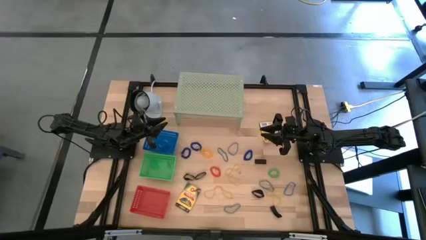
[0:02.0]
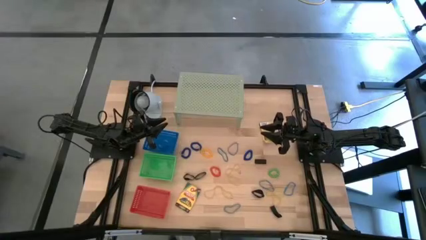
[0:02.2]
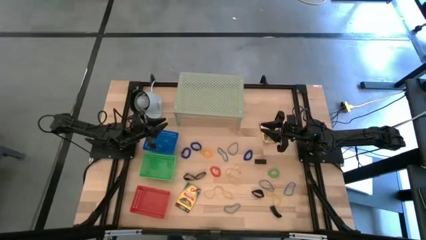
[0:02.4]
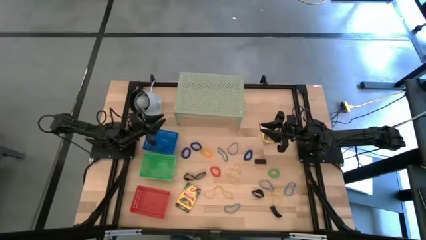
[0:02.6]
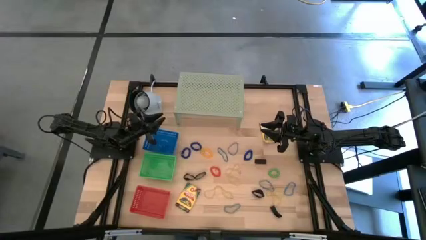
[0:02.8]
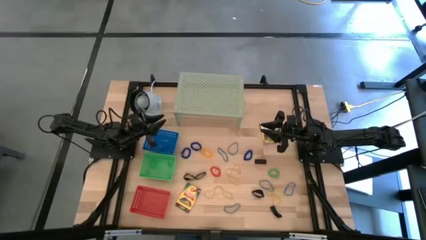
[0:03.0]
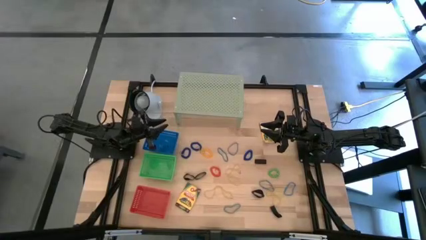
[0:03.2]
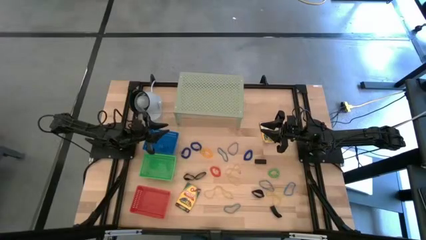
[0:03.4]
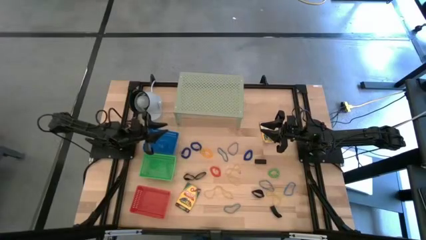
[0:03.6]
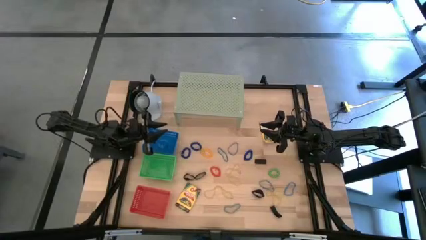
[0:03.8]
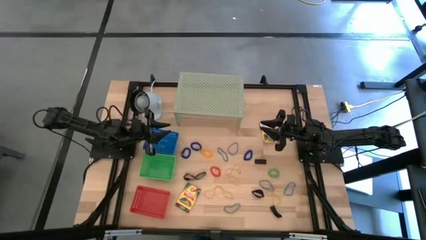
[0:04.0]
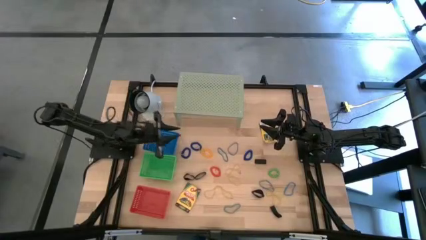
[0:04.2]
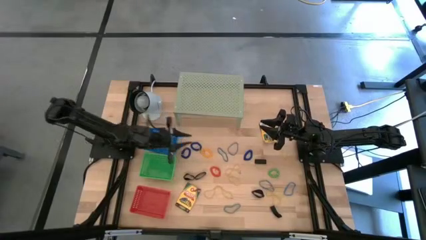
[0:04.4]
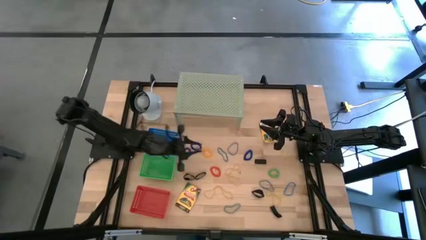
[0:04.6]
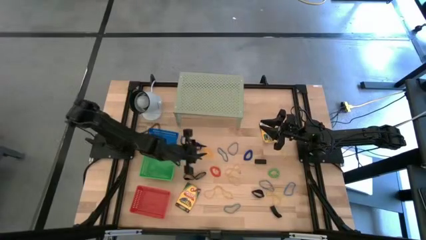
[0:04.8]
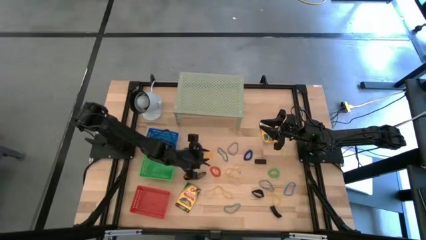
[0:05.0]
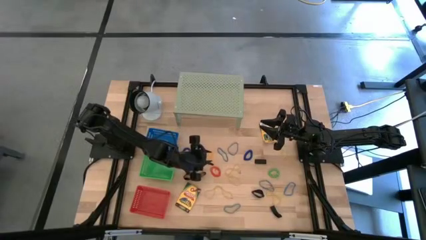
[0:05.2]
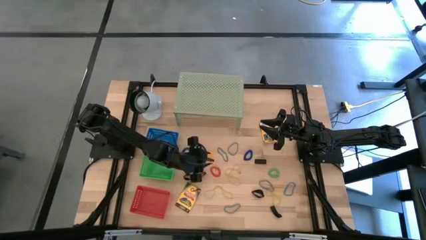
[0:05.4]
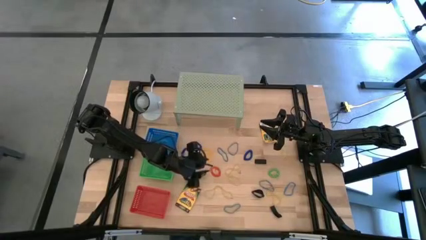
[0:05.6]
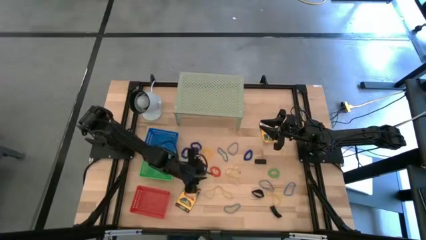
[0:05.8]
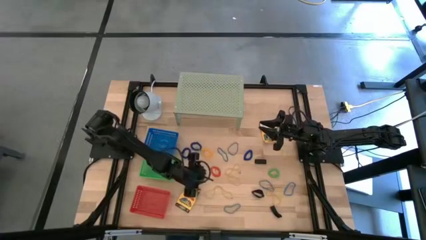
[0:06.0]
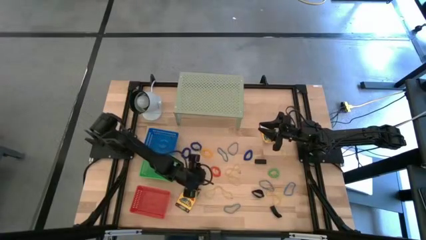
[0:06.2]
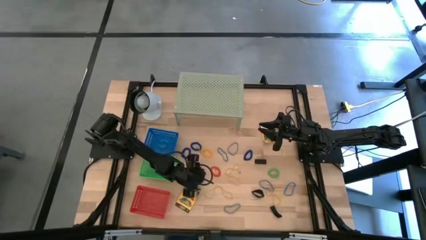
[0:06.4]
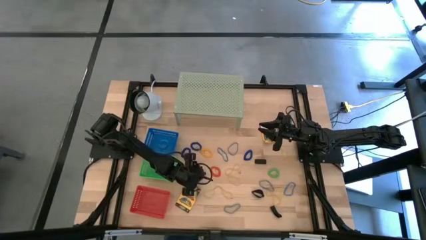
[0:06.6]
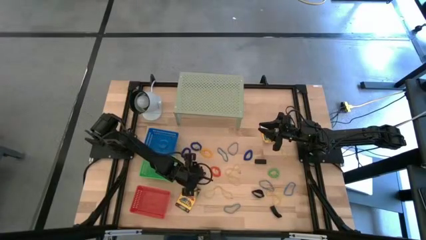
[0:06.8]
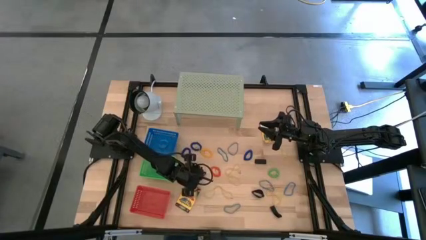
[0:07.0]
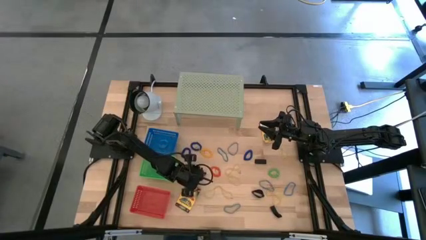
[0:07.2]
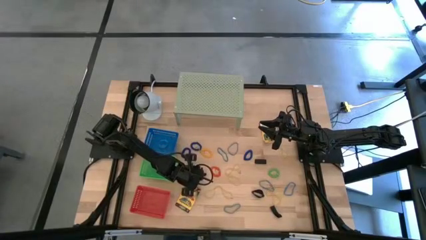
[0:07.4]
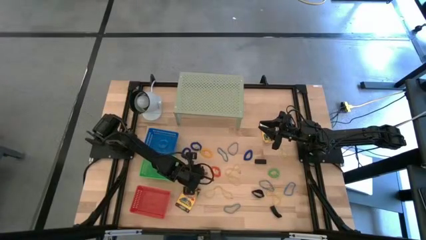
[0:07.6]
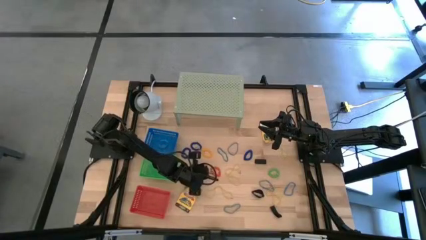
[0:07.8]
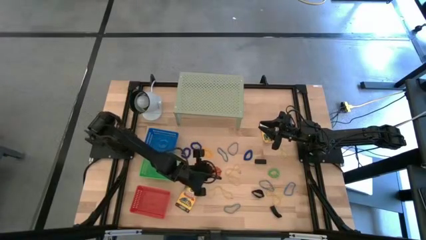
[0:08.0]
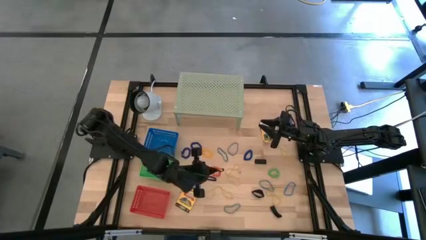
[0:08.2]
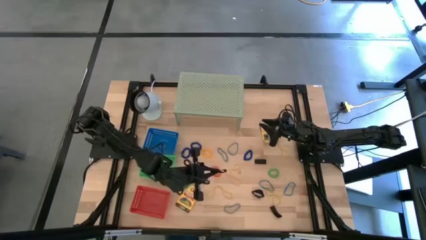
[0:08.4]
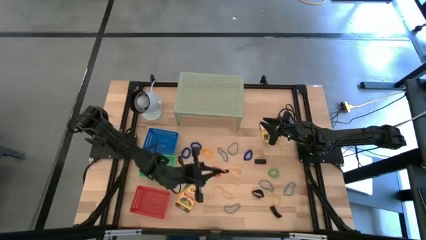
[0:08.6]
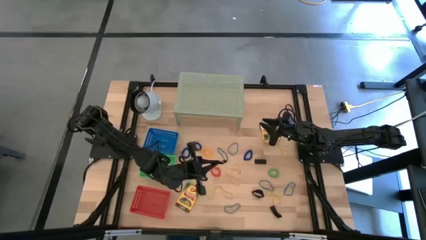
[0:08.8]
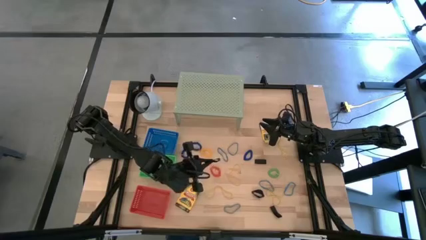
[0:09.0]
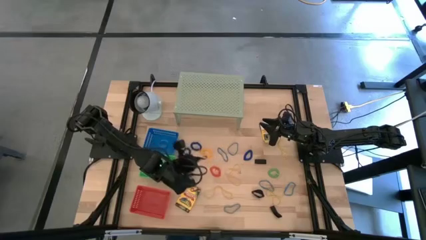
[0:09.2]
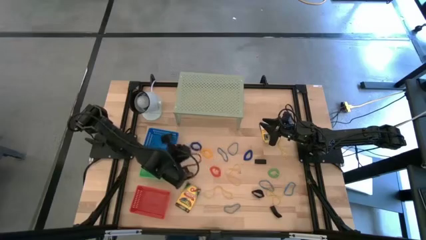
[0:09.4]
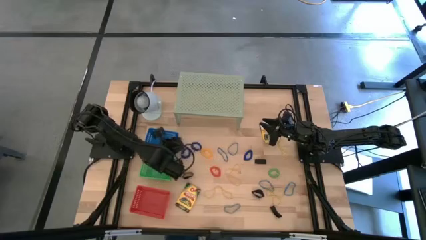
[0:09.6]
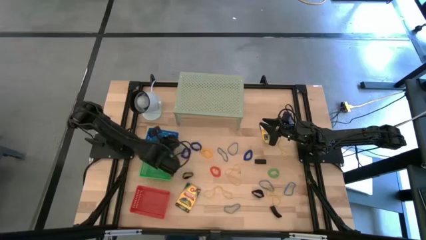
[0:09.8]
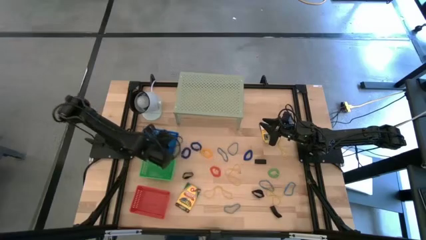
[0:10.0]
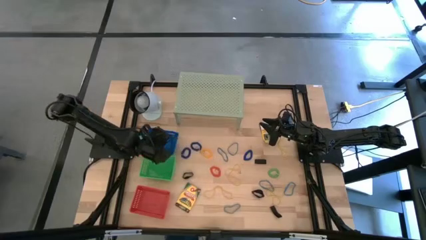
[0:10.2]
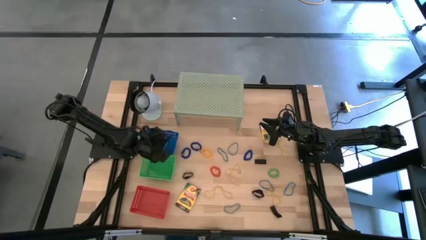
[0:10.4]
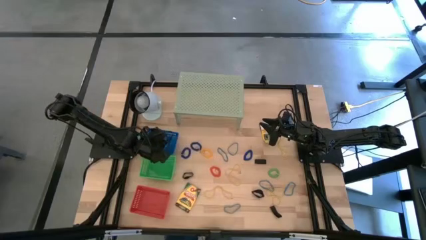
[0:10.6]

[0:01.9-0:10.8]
Task: Pick & Place Office Desk Supplies
Put the black rubber band into the blue bin

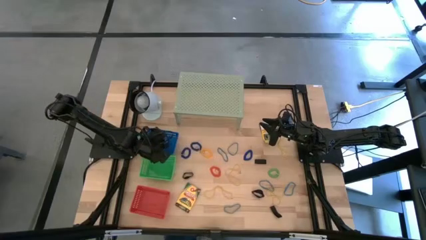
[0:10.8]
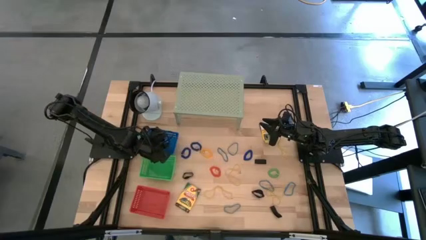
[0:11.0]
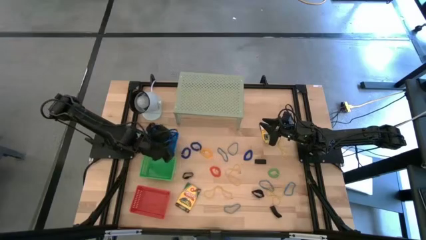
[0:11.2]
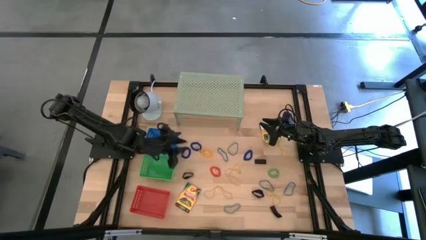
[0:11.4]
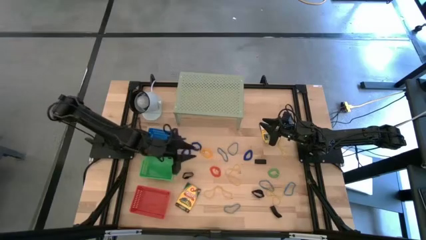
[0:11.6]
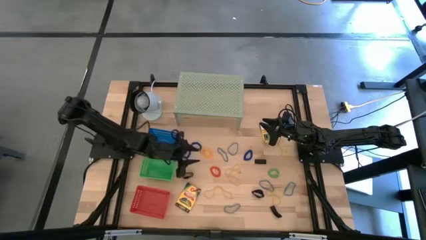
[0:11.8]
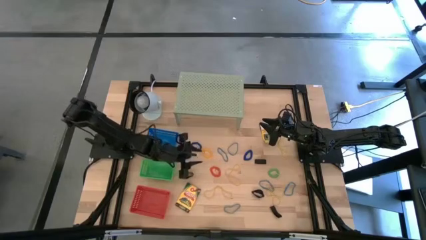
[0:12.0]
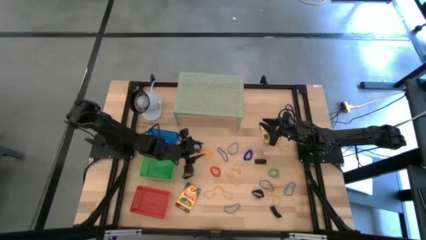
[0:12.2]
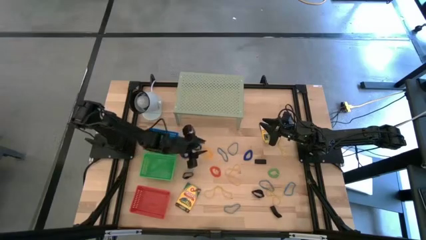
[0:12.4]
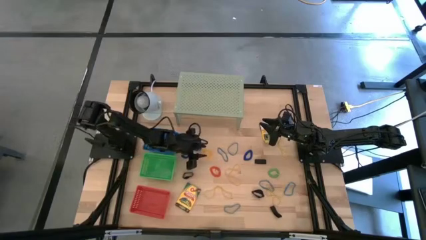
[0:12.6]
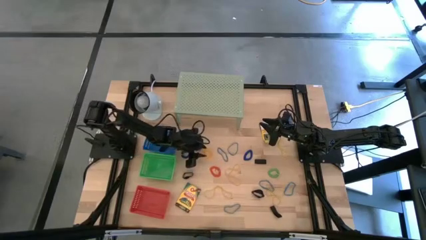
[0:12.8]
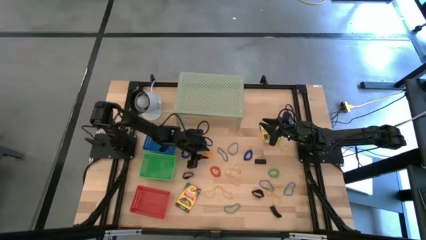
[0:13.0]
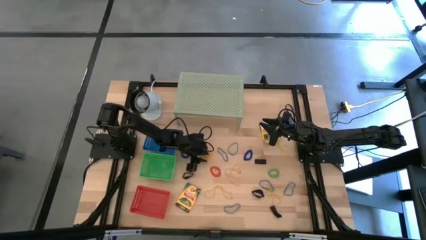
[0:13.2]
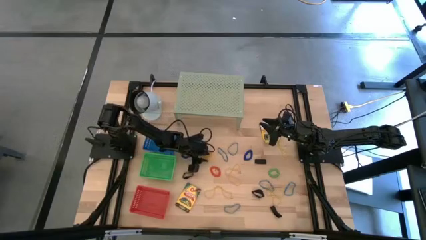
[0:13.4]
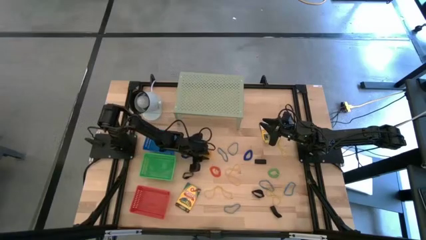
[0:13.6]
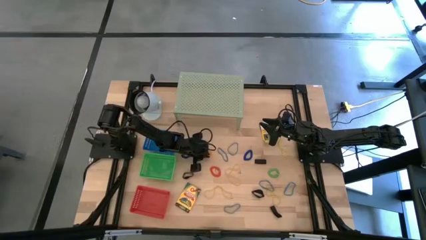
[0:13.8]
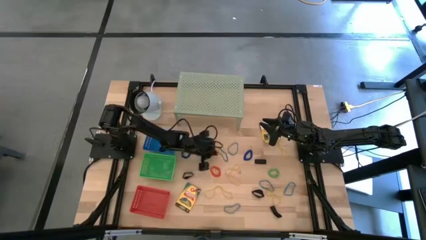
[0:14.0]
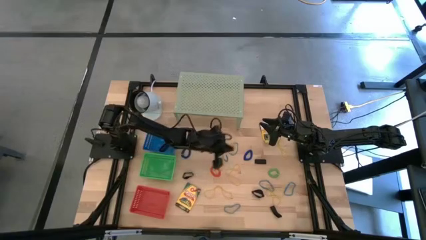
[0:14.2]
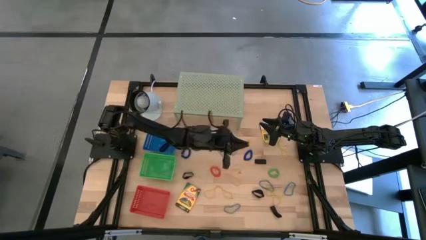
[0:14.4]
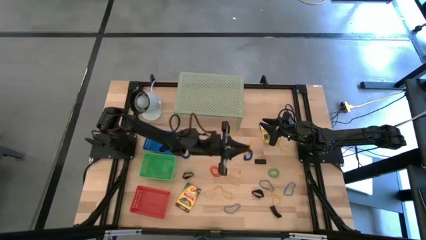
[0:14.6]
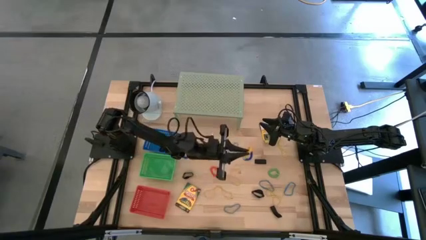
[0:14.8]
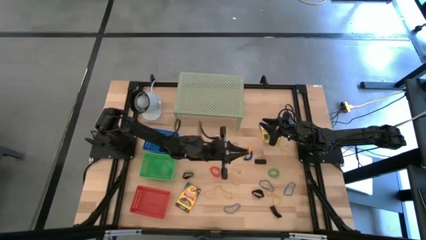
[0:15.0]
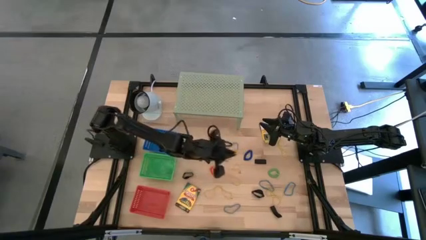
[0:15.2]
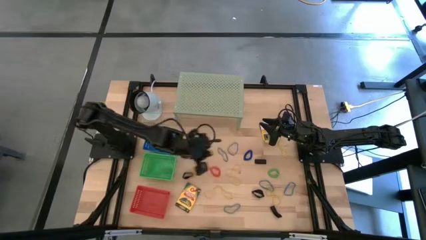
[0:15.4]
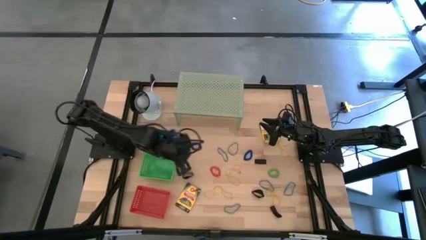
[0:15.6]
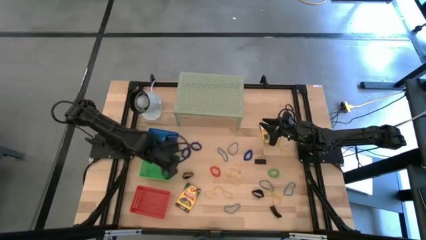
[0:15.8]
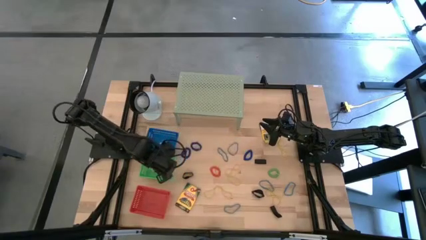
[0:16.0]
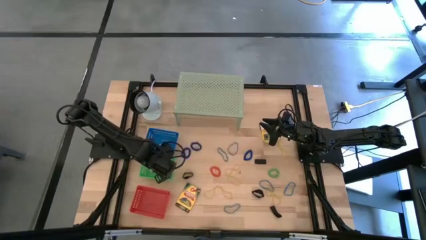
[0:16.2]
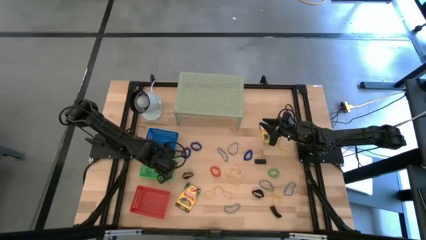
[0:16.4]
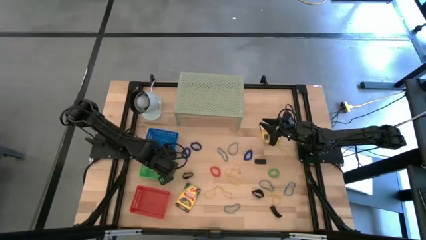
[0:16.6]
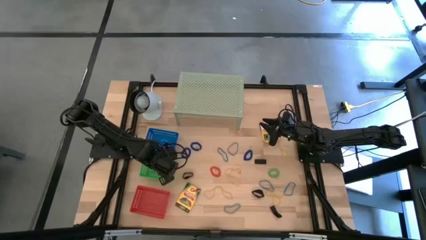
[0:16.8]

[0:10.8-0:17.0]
Put the yellow spring keychain into the green bin

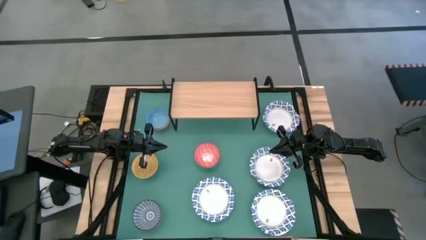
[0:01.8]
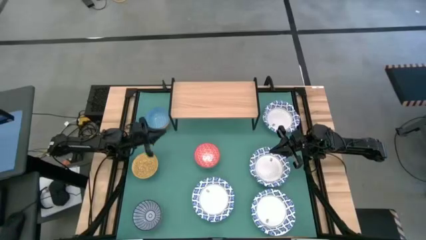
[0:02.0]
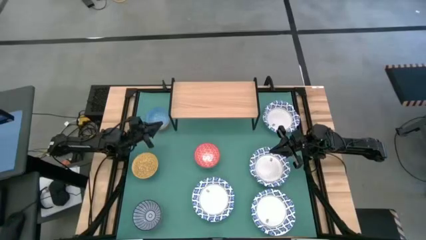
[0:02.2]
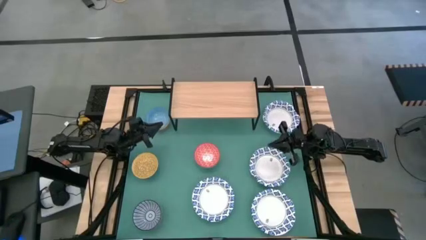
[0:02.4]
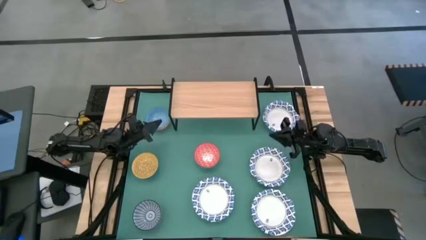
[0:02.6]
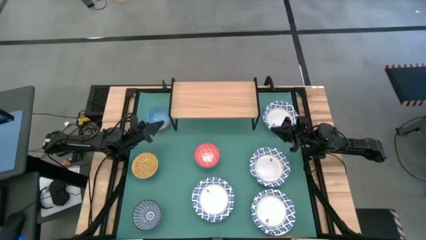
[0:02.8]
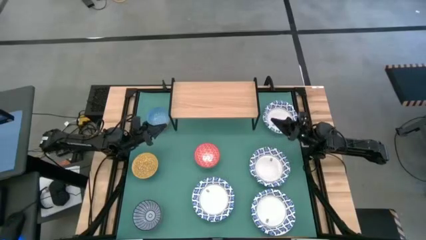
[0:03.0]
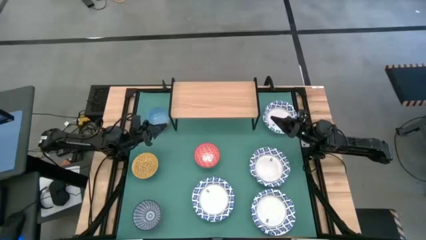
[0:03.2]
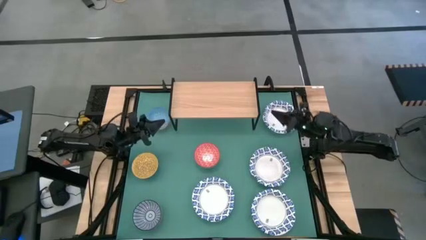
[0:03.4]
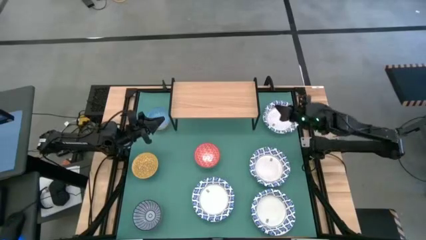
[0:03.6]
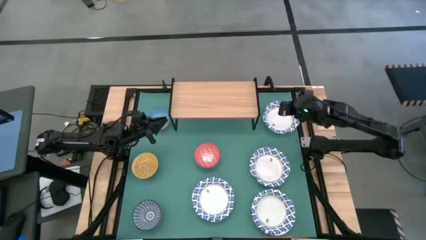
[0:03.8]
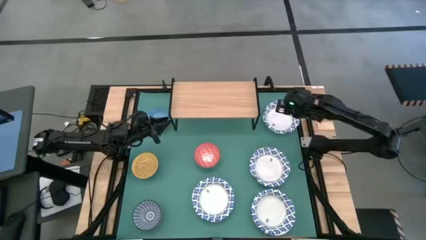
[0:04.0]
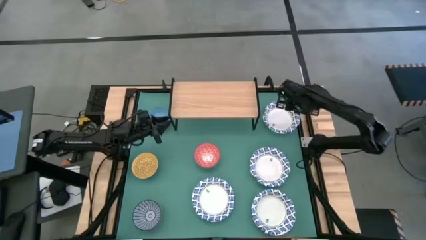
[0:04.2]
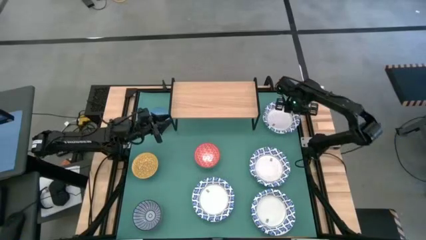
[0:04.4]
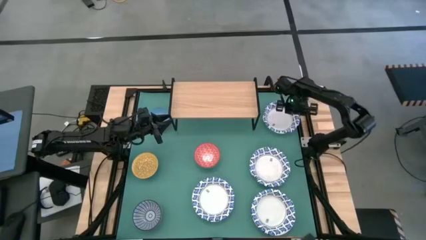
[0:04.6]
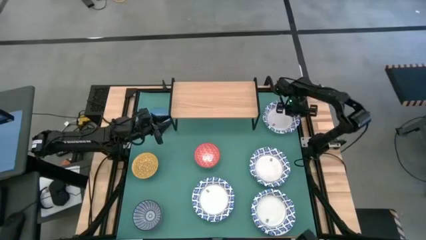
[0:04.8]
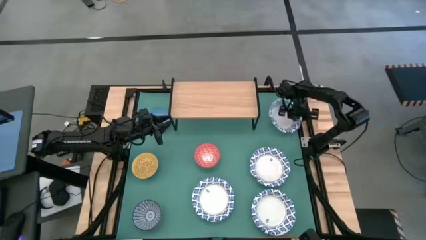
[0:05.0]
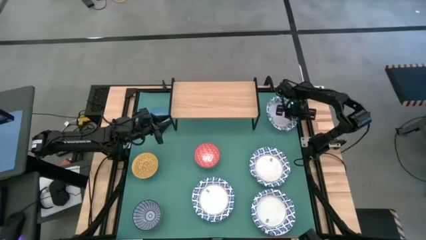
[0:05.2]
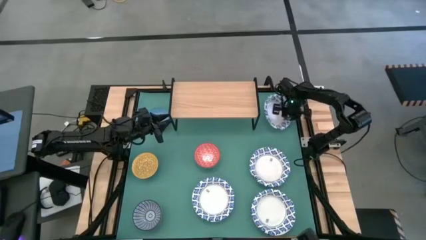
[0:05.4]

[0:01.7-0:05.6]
Task: Place and stack bowls onto a shelf
Put the white patterned bowl on the shelf
